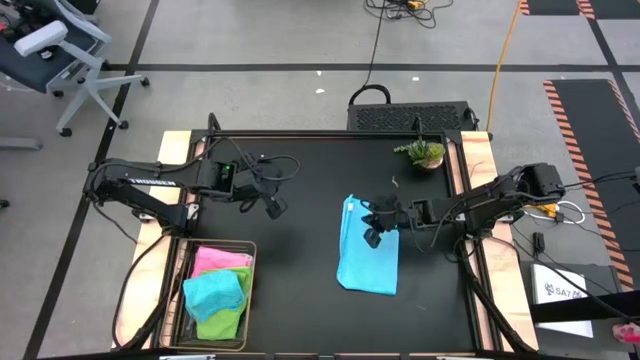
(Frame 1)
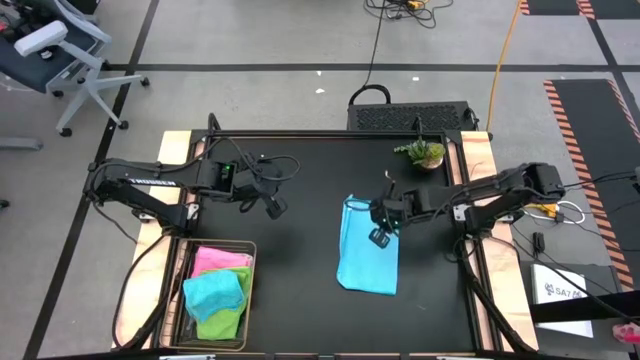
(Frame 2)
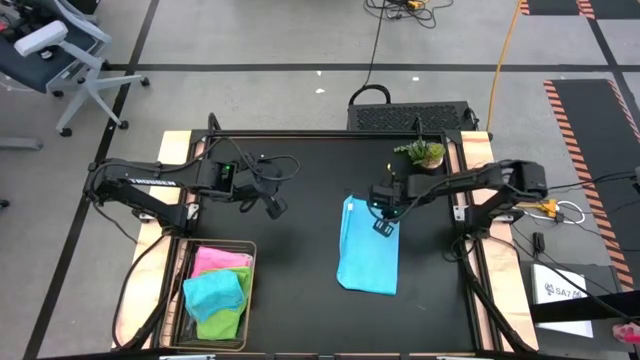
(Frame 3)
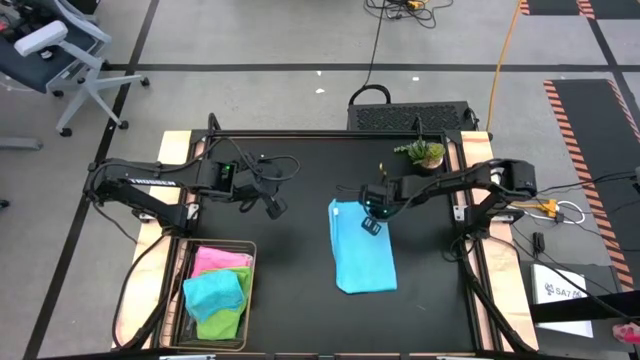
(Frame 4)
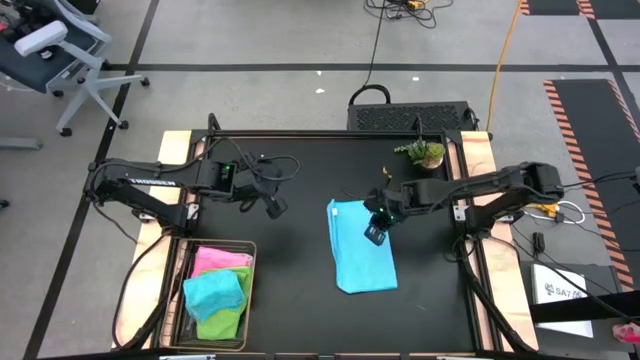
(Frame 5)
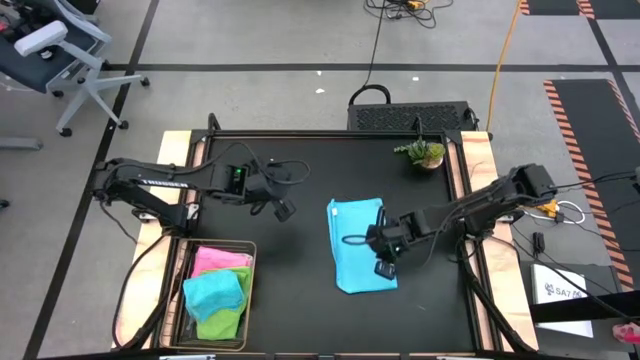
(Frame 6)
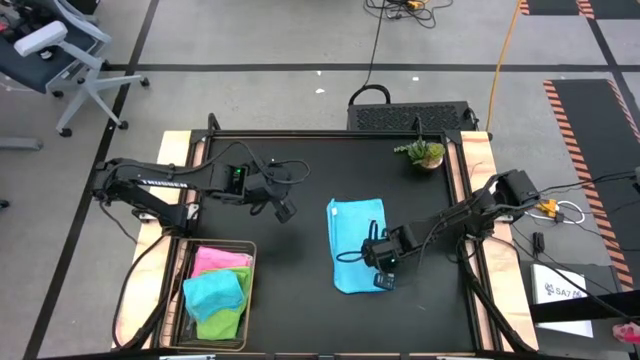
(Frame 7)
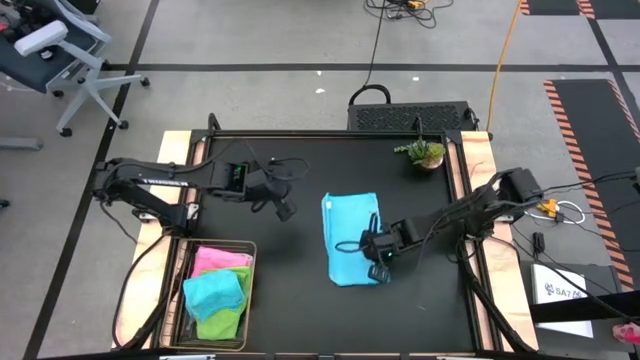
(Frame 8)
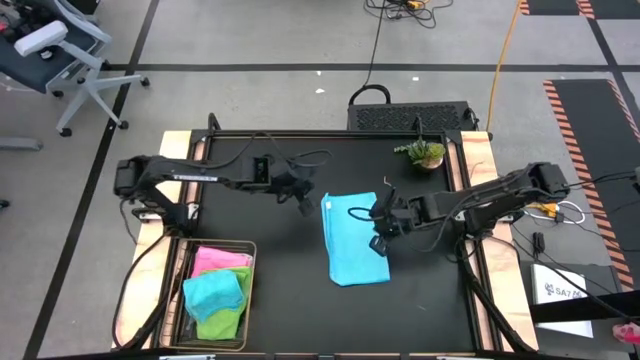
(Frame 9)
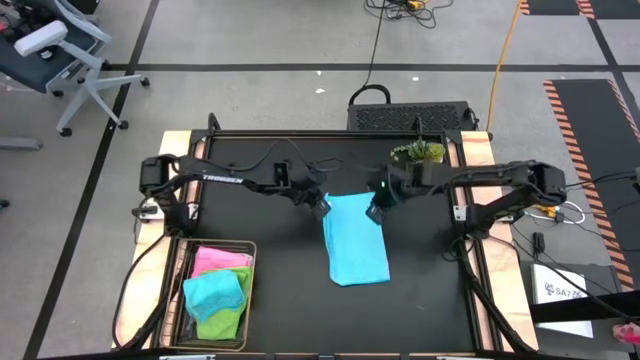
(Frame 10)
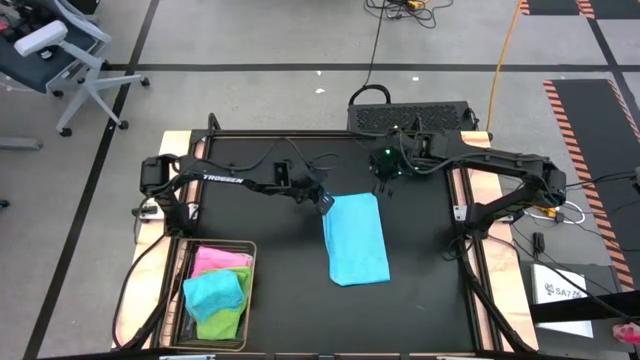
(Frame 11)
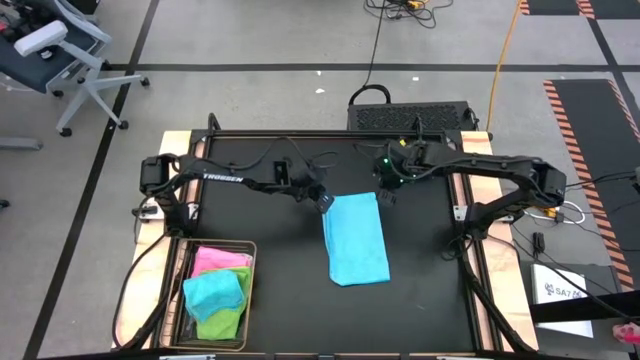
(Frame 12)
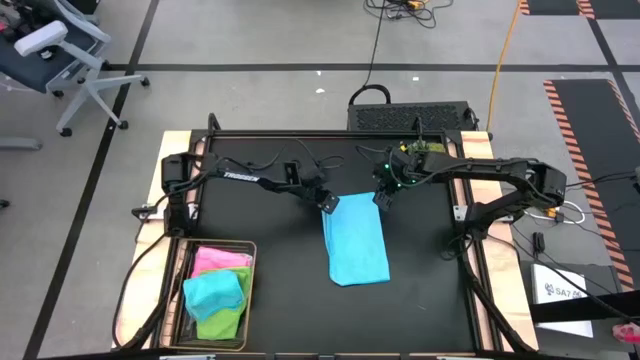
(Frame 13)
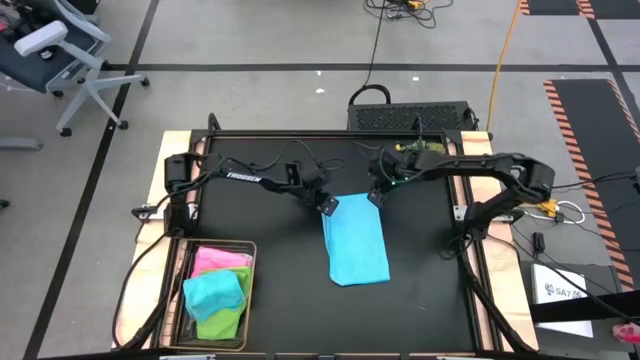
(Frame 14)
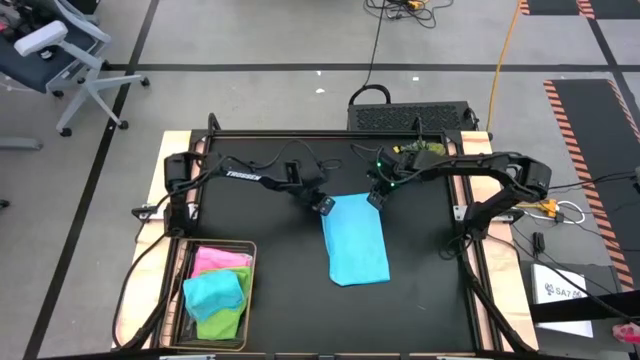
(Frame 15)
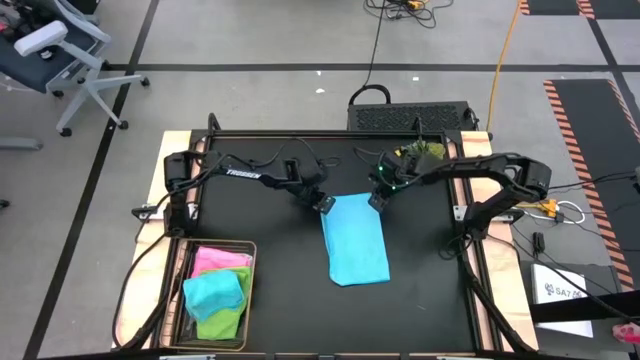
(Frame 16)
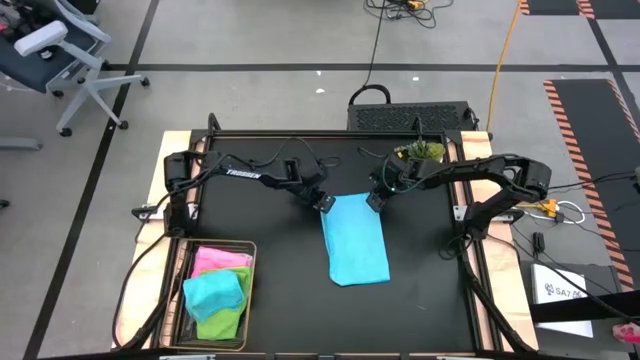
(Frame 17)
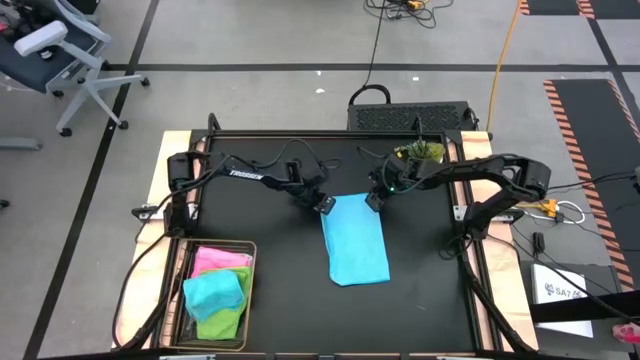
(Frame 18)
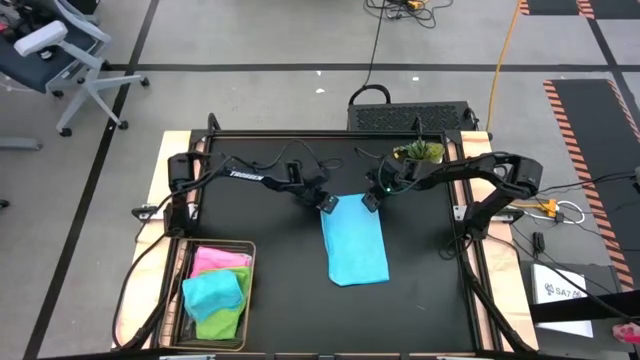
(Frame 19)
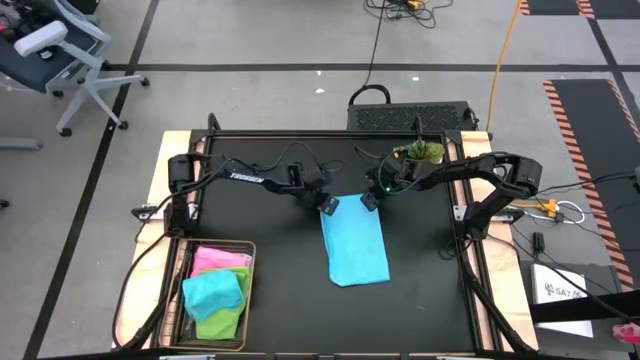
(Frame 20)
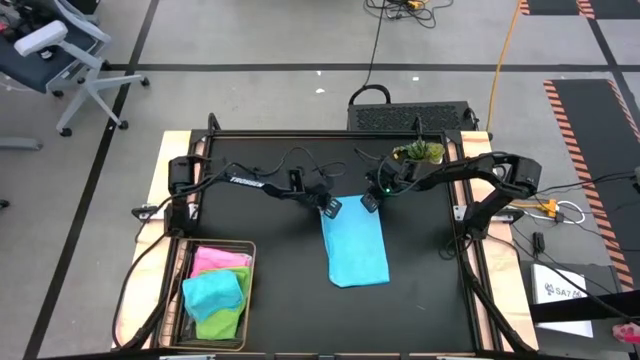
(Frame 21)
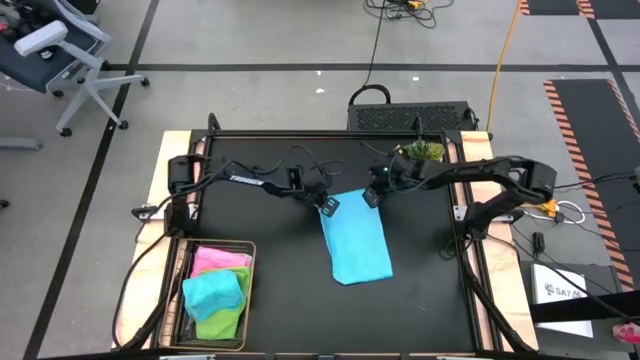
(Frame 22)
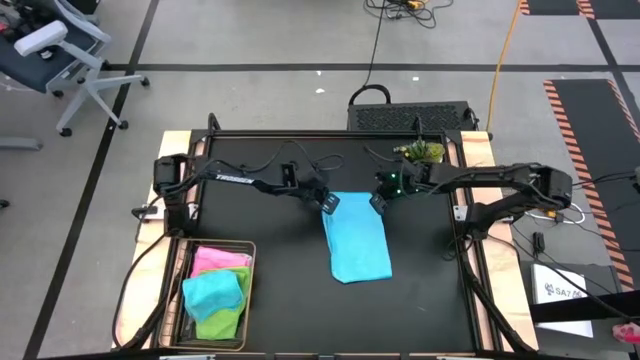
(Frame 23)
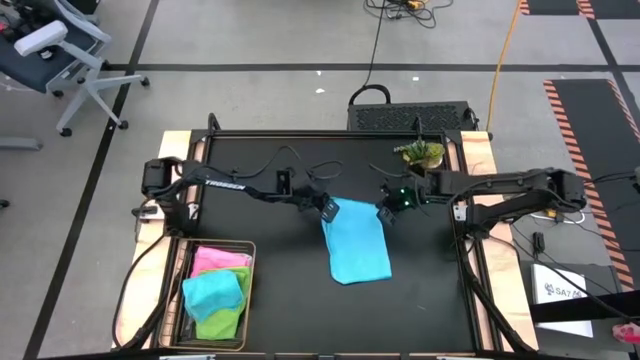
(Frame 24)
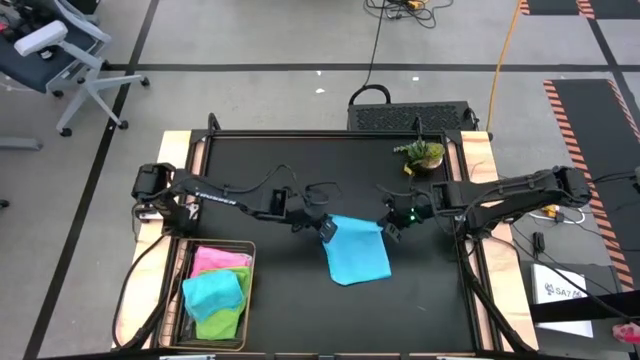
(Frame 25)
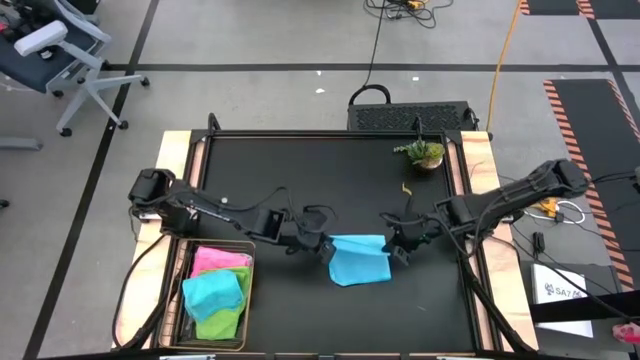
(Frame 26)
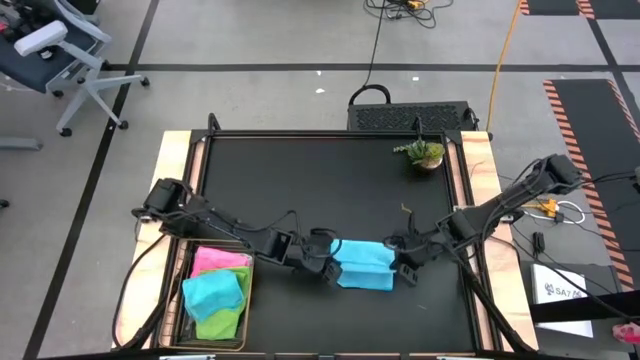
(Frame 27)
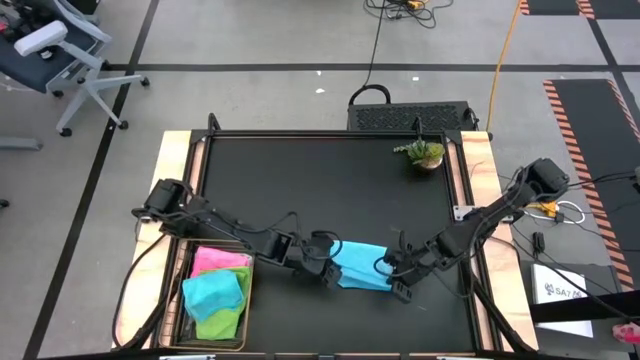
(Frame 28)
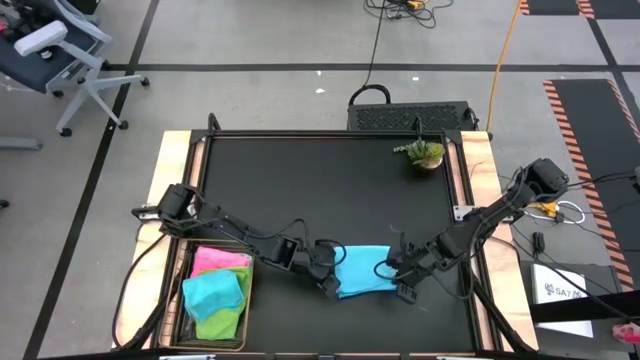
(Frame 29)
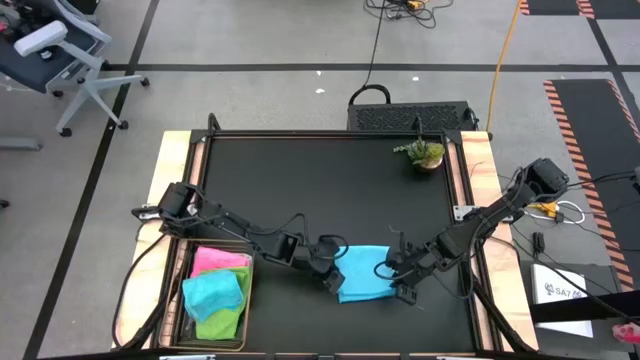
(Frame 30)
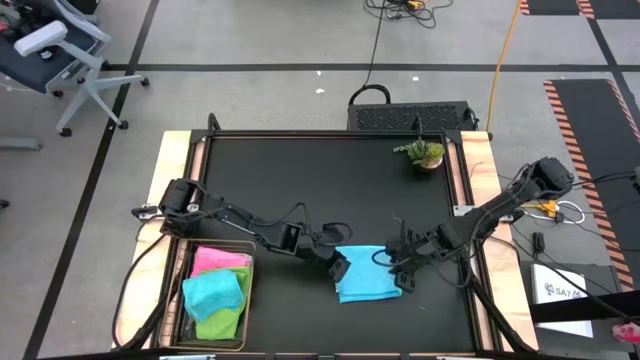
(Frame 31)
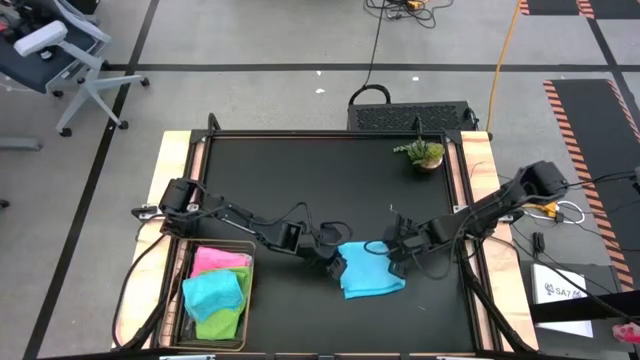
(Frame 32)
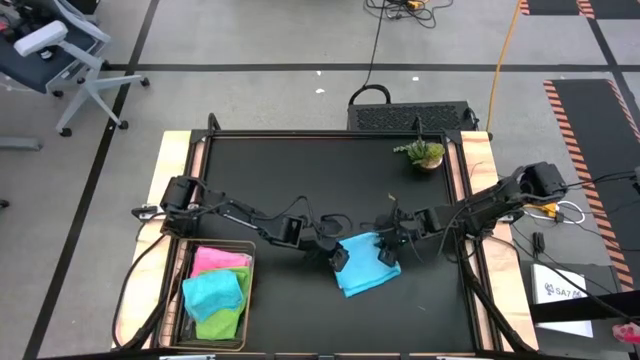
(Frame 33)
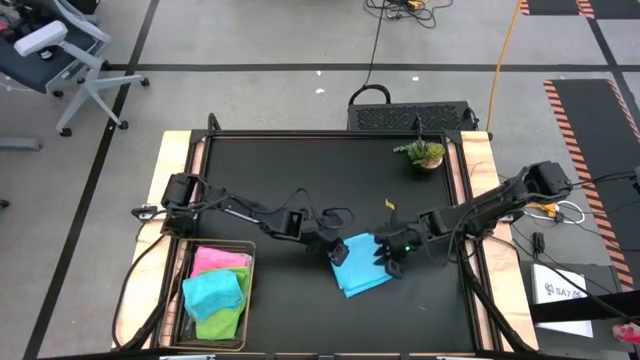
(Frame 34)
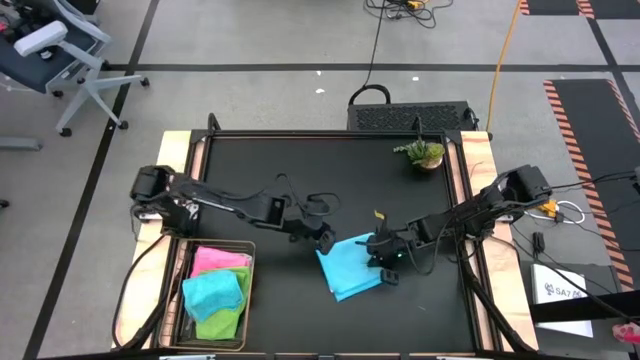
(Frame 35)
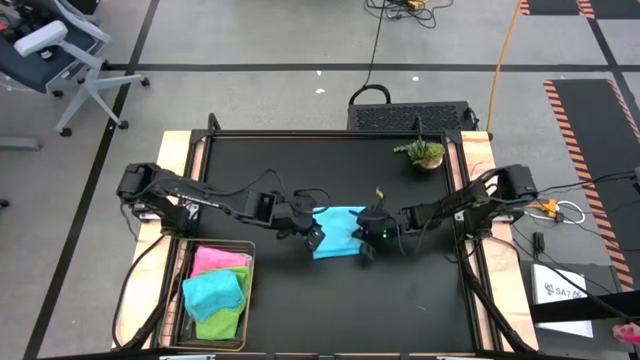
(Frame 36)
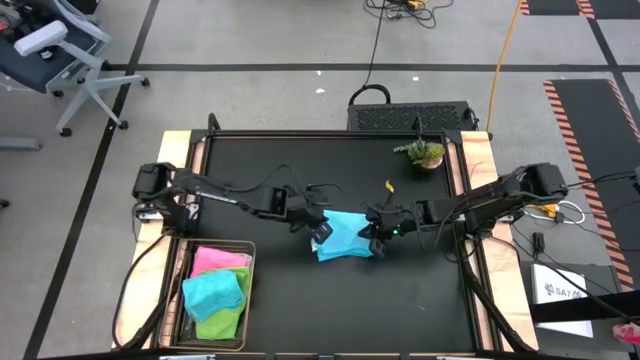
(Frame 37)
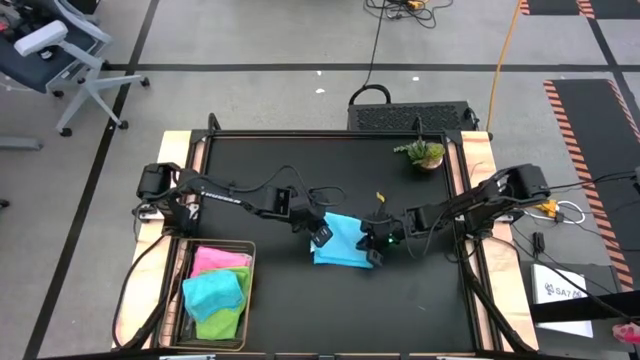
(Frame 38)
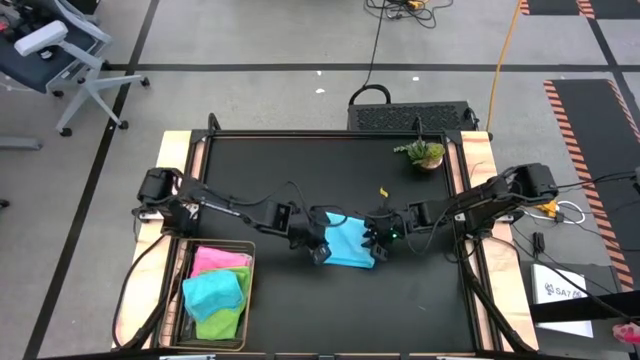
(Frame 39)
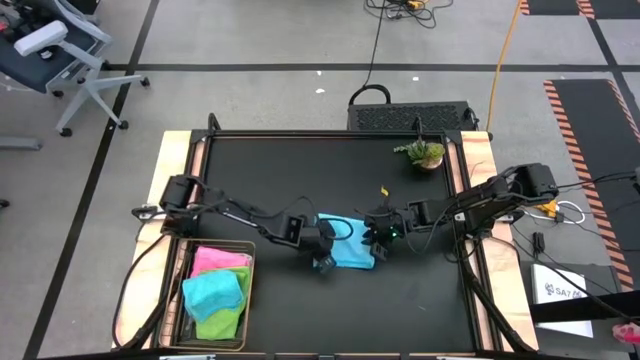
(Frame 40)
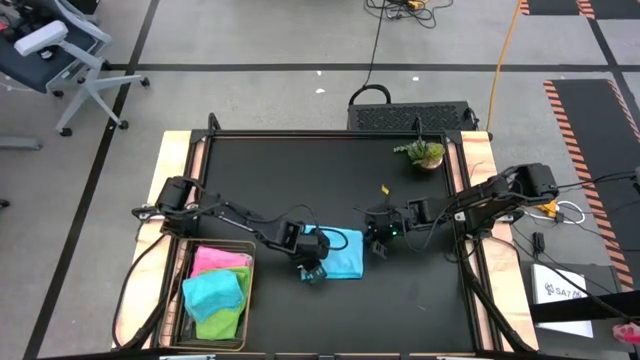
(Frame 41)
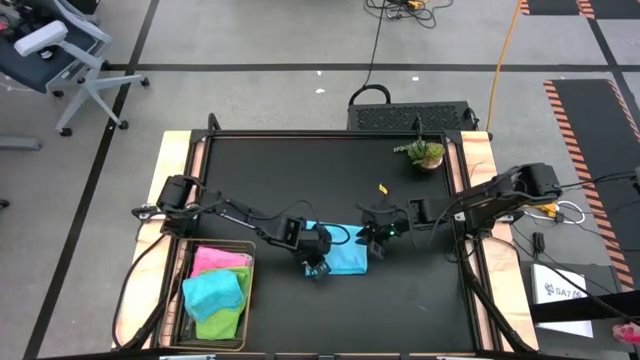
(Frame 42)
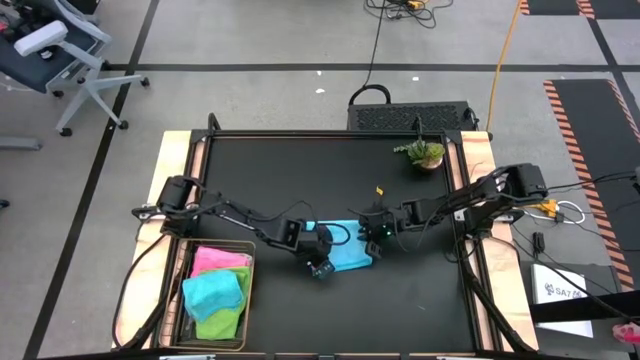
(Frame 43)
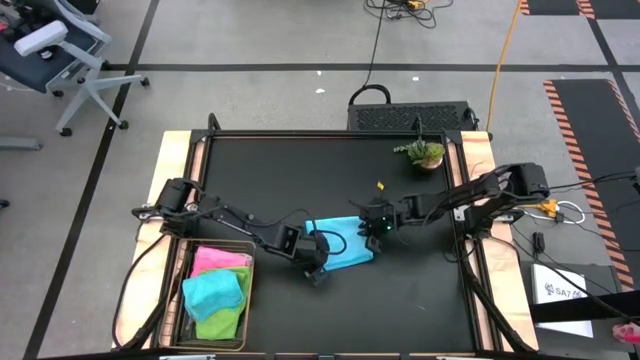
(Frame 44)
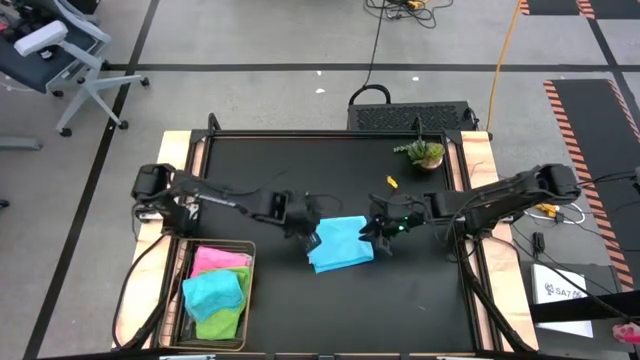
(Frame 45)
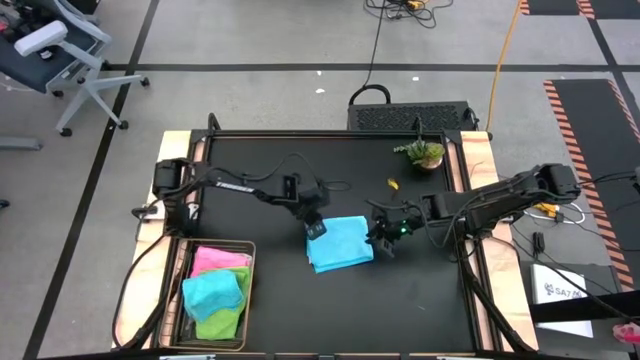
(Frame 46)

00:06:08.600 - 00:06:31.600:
Task: Fold microfiber towels
Fold the blue microfiber cloth
